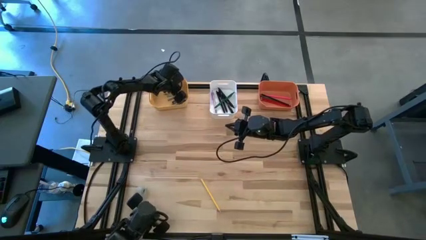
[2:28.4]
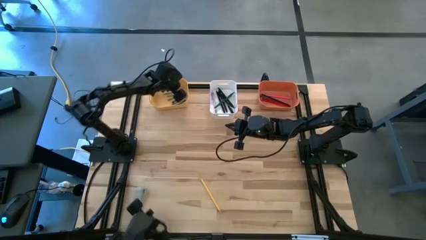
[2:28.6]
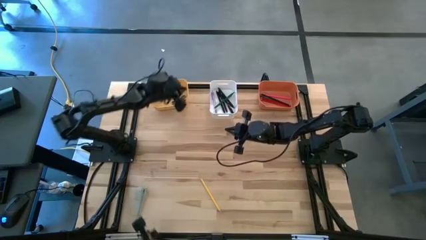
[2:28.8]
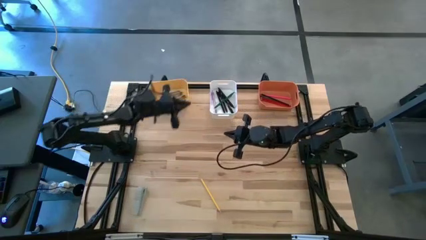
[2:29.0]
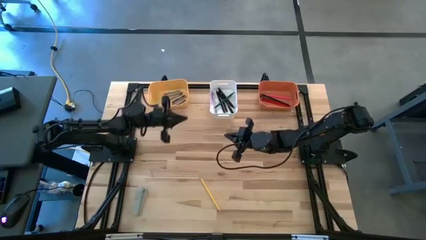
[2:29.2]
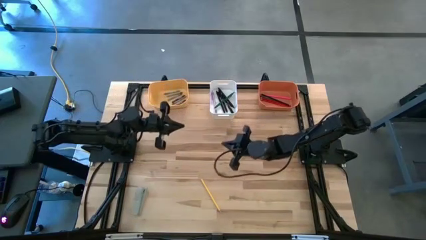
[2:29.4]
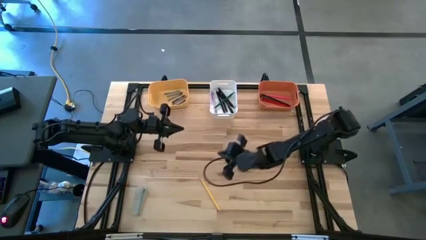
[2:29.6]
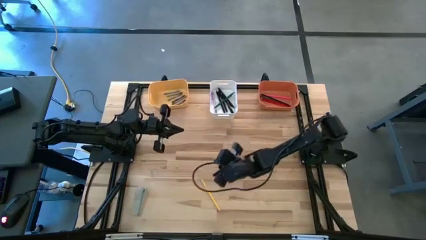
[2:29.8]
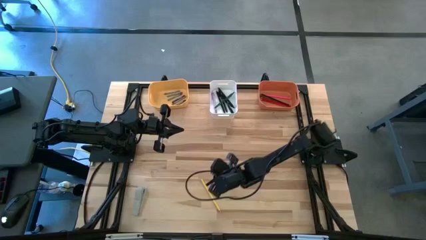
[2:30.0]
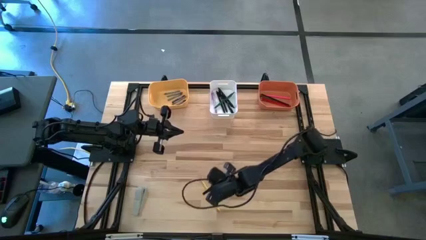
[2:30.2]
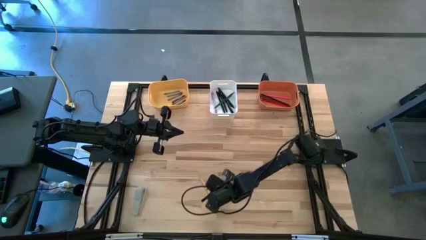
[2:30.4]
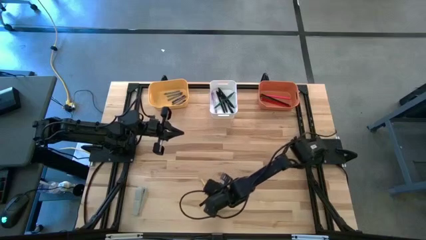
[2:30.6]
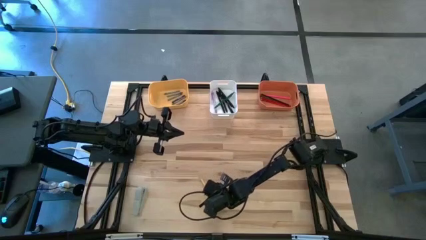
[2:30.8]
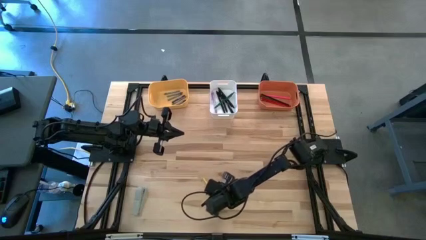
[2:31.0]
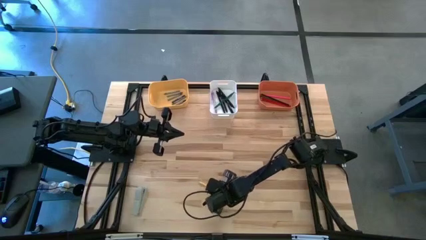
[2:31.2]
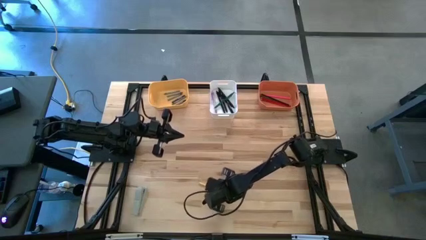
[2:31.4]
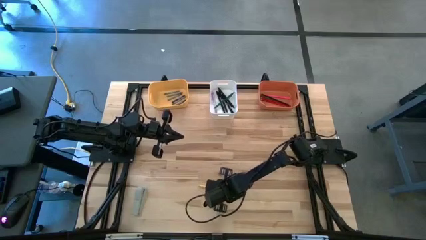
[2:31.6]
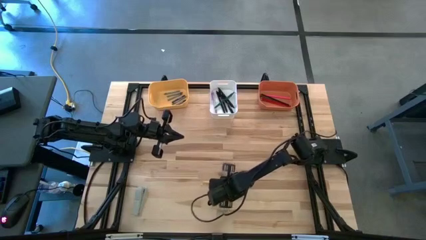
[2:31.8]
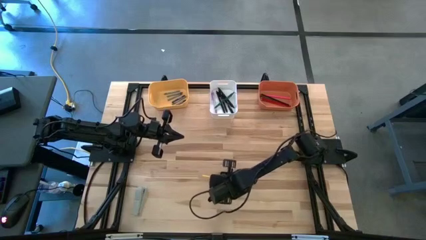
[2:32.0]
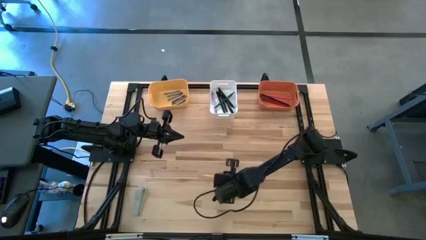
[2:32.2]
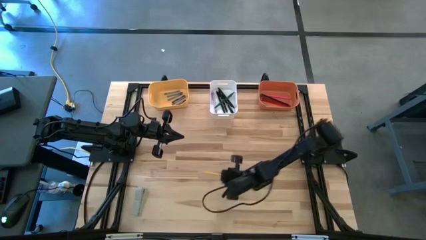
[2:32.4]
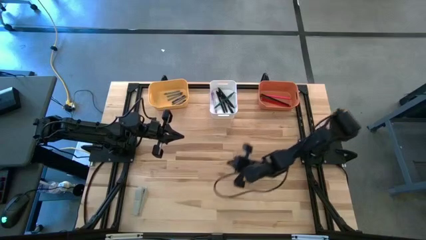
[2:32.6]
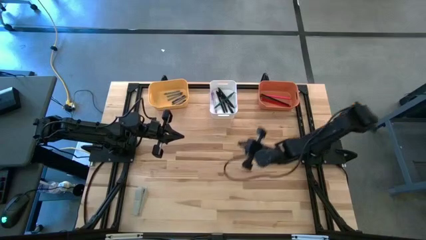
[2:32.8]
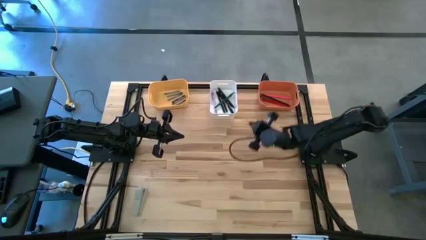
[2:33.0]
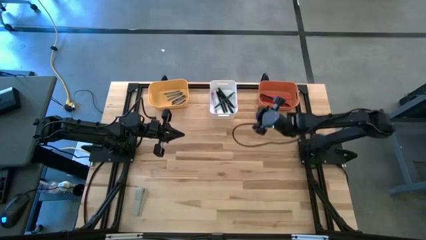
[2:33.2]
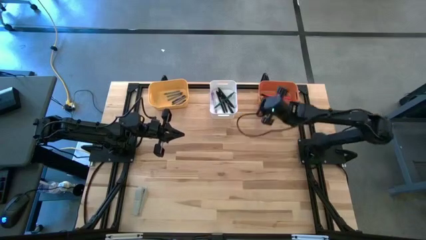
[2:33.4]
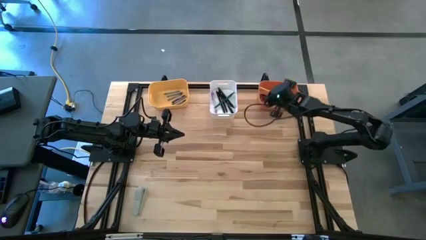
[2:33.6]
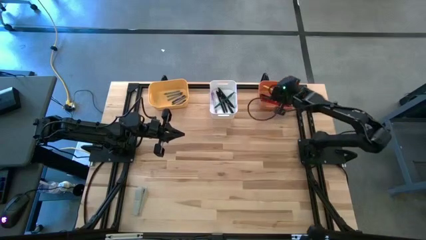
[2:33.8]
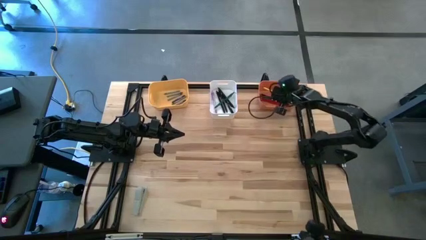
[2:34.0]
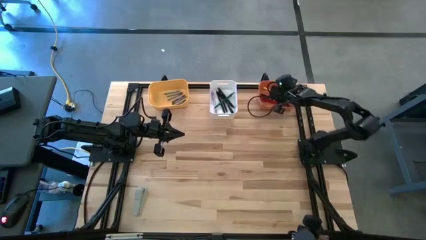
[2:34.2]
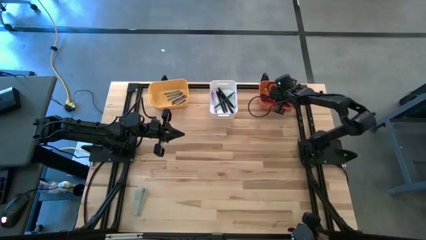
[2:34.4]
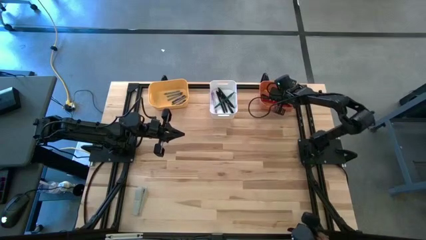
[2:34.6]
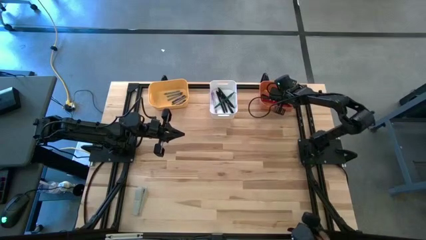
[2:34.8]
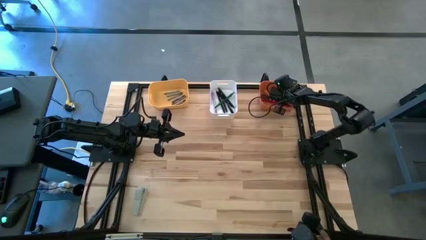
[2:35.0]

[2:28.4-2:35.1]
Task: Sort crayons/erasers/pens/pencils in bins
Put the yellow pencil into the orange bin

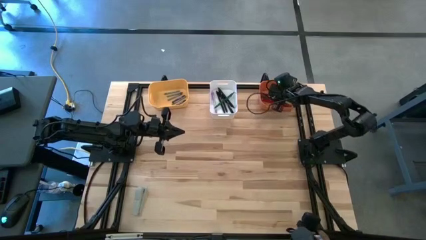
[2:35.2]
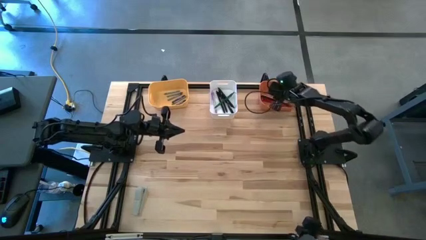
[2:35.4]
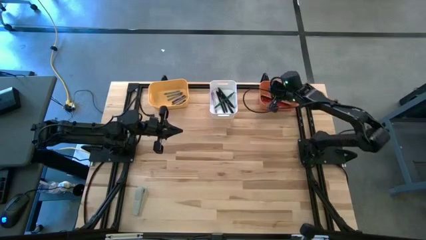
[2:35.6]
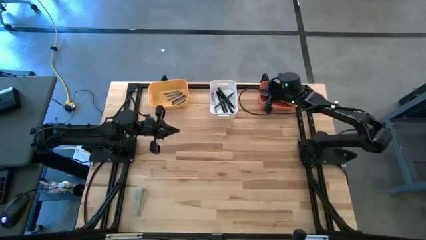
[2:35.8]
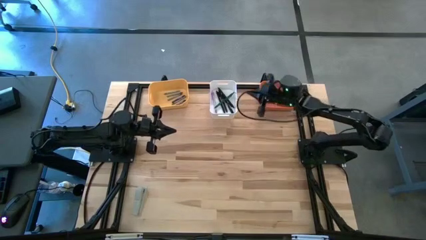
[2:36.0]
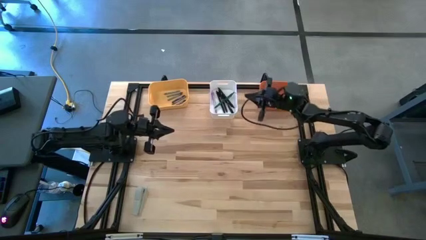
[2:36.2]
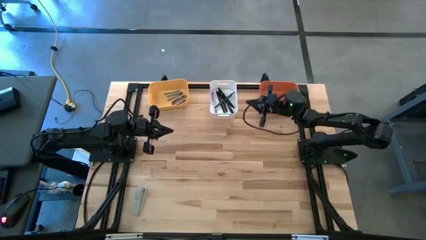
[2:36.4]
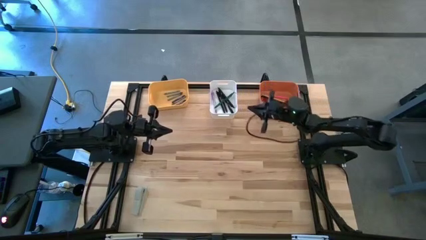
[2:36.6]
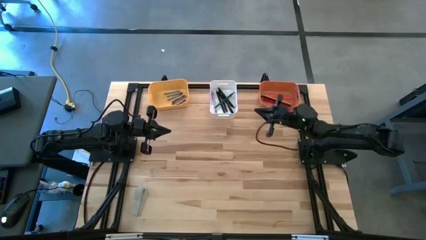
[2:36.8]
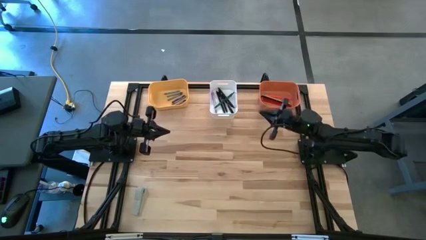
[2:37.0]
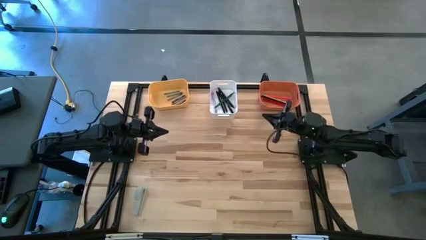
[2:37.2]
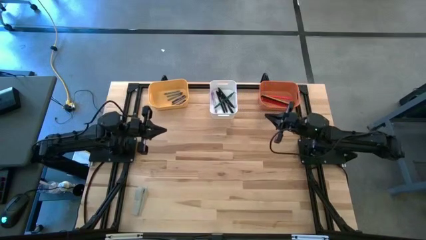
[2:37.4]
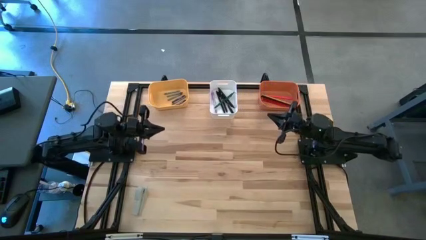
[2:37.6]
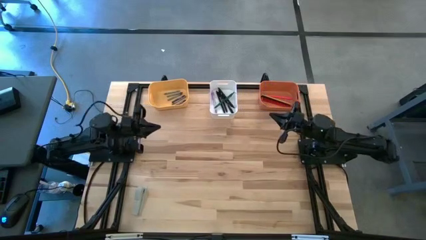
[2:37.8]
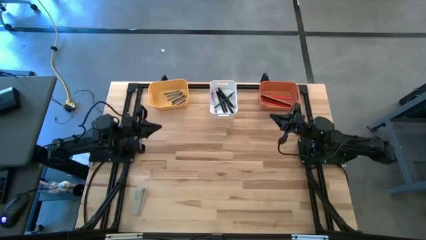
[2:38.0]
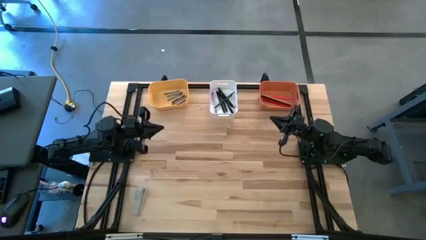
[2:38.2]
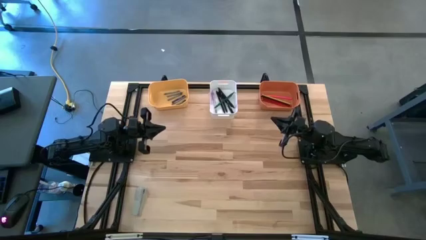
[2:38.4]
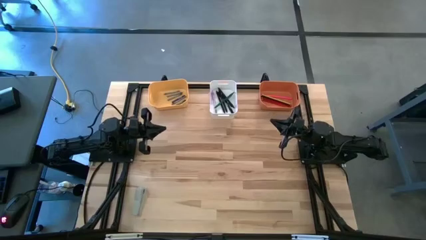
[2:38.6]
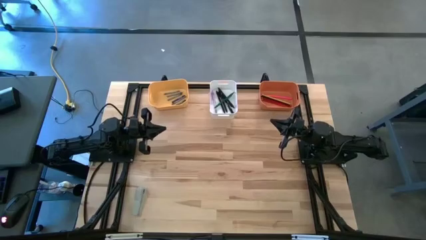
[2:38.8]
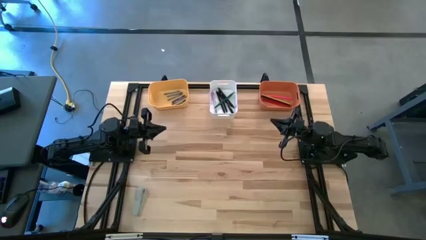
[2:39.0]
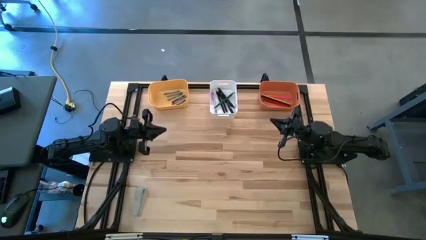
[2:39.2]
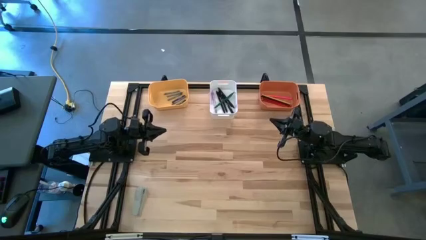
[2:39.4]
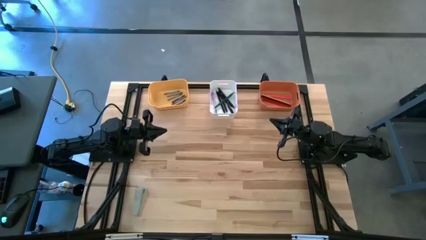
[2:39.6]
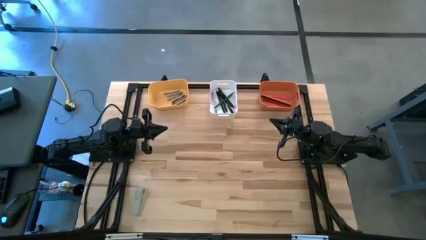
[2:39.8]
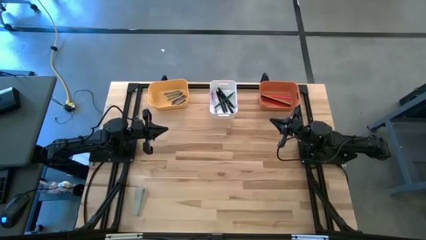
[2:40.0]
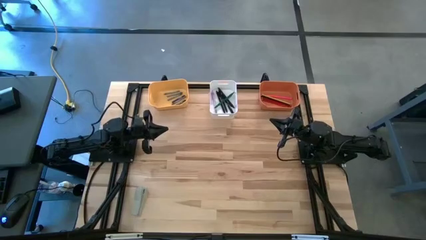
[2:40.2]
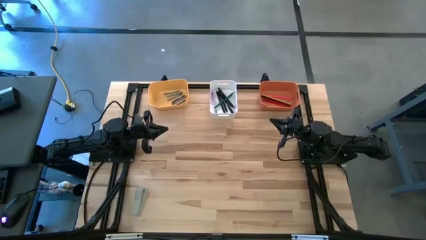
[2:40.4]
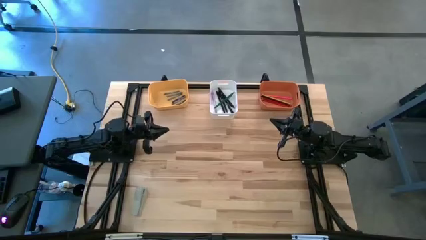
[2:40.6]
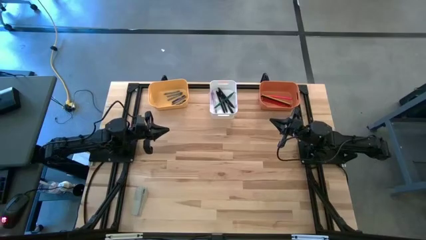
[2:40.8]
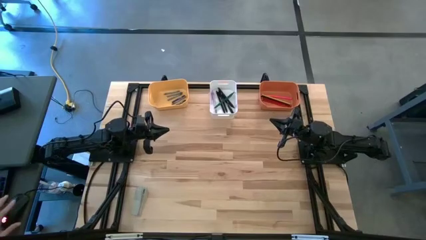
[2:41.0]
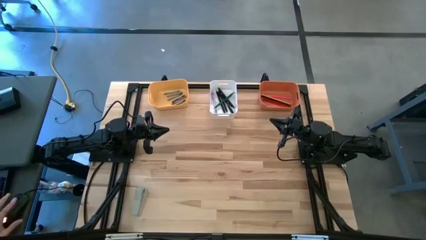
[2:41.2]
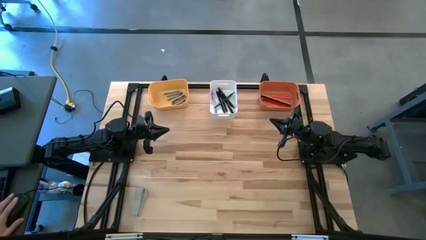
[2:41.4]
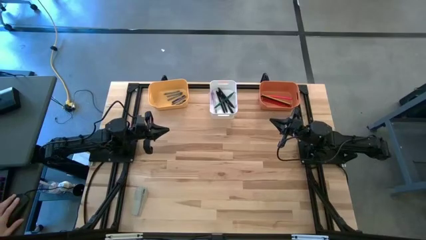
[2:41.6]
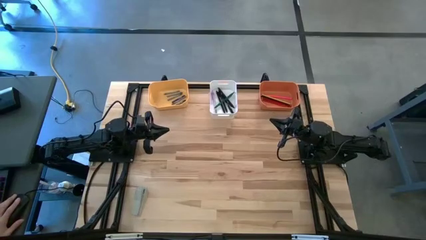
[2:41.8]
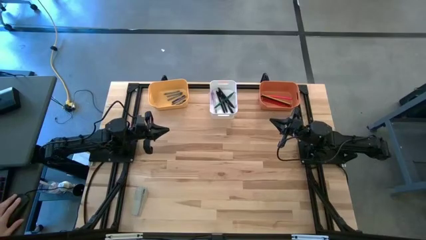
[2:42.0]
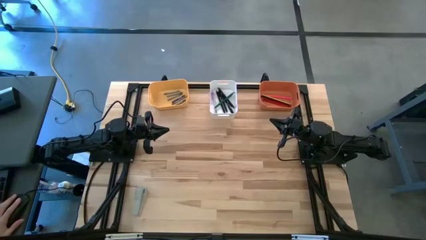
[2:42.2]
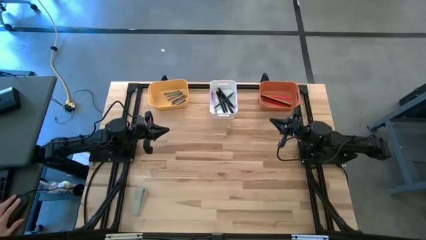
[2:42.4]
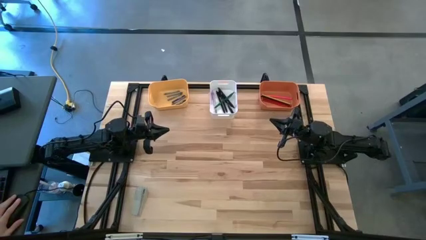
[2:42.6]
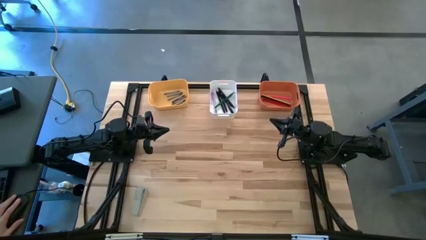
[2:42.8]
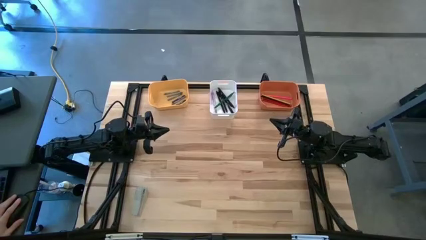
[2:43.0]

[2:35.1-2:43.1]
Return to Home Position

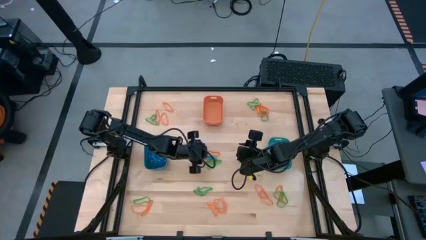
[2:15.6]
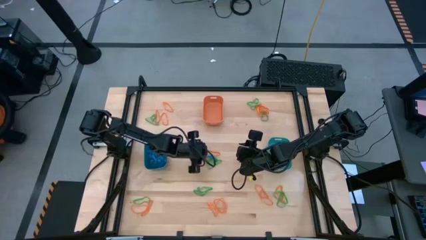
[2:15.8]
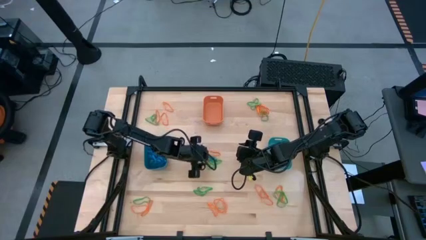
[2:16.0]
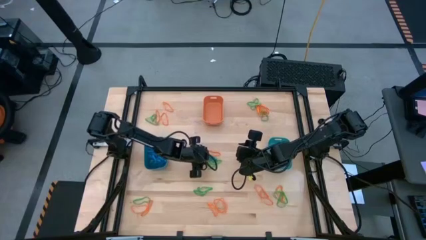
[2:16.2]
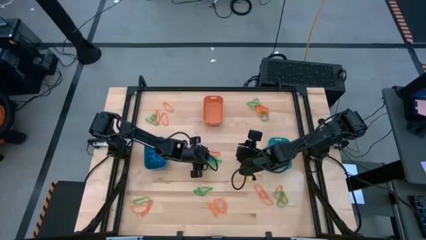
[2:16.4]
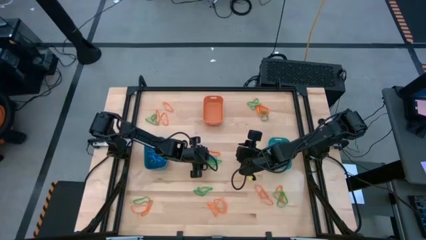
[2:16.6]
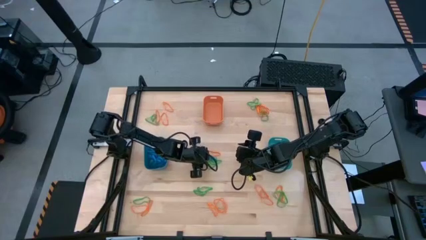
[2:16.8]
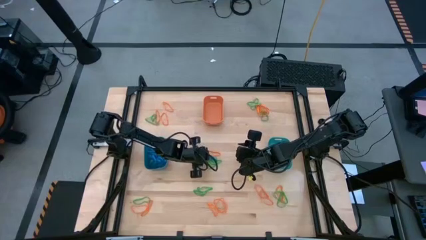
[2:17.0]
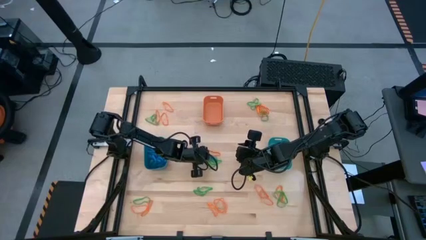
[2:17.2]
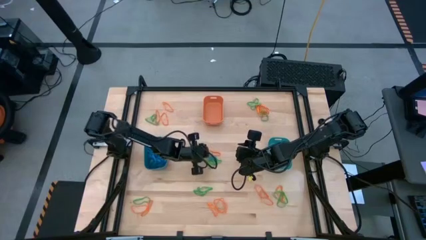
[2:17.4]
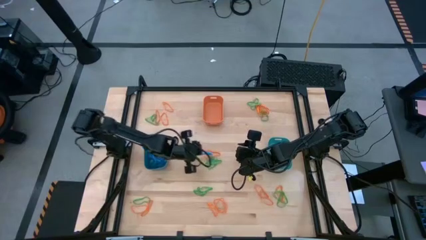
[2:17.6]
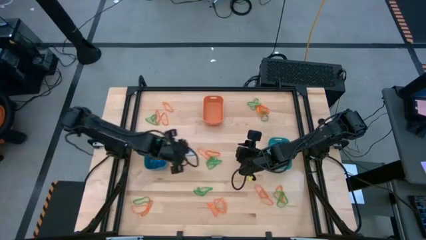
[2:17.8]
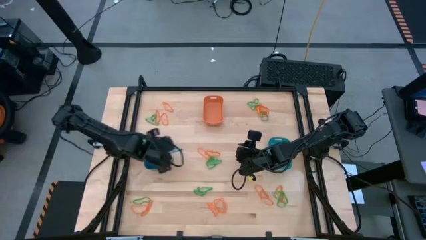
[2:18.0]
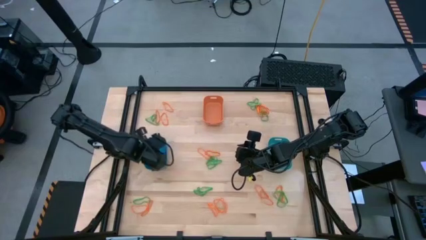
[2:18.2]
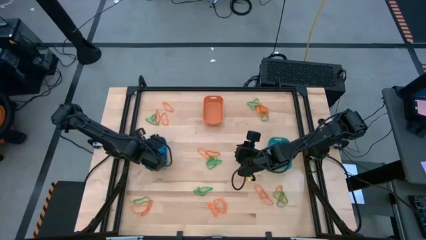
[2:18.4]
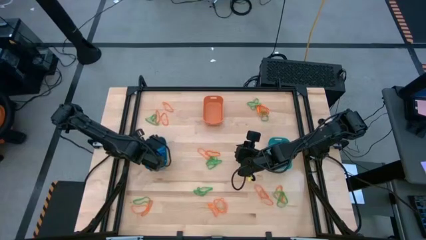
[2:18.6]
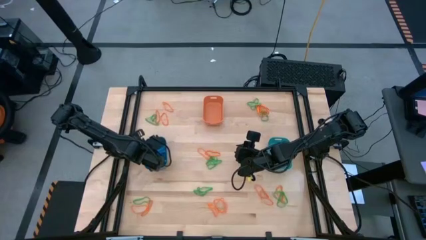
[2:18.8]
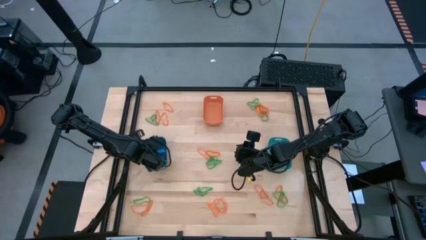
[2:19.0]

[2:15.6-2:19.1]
Task: Sort rubber bands into baskets
Put the blue rubber band into the blue bin
